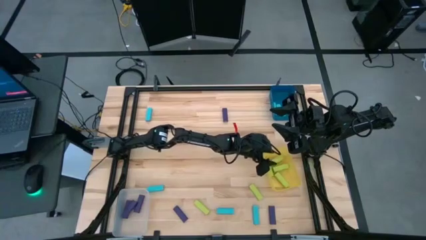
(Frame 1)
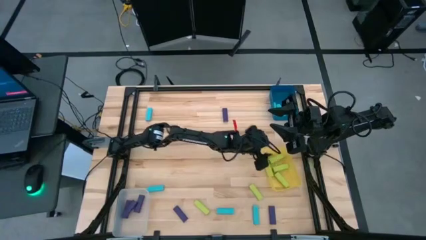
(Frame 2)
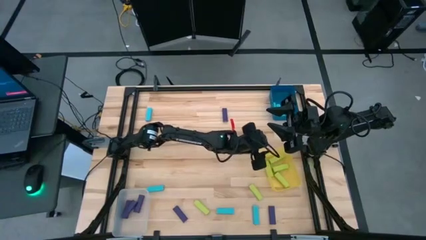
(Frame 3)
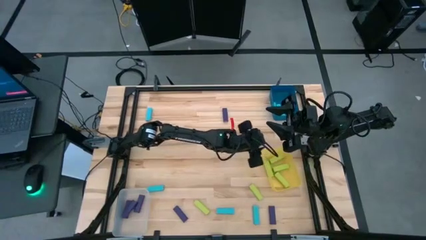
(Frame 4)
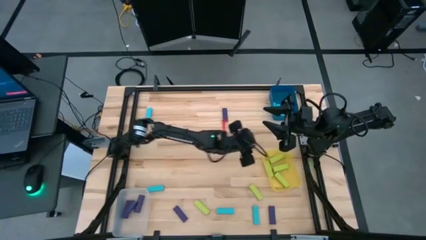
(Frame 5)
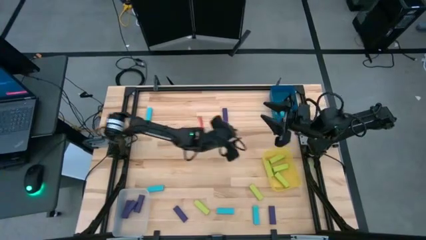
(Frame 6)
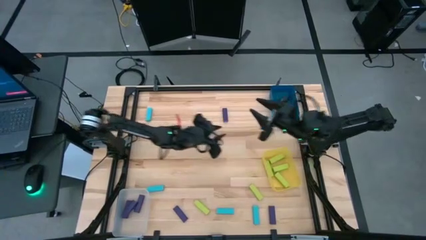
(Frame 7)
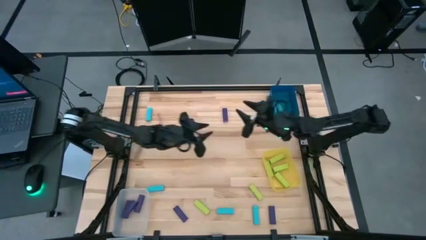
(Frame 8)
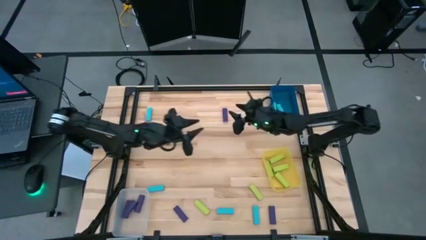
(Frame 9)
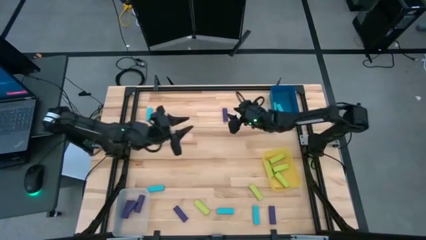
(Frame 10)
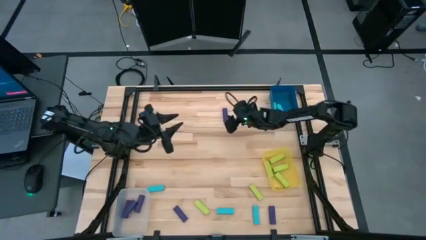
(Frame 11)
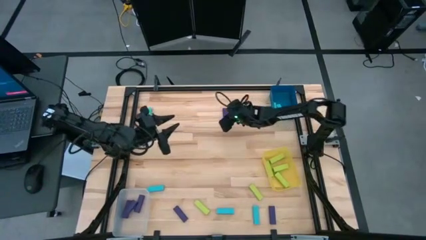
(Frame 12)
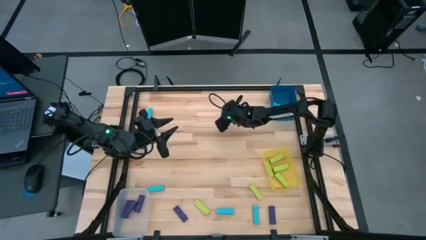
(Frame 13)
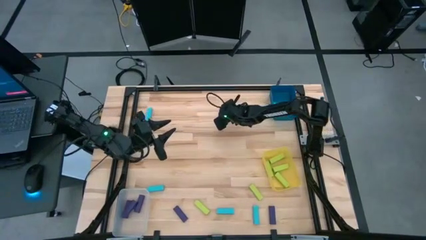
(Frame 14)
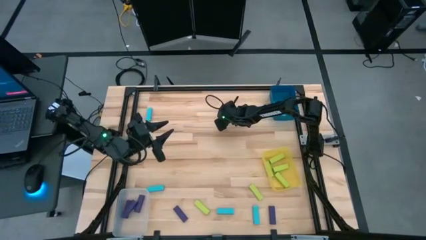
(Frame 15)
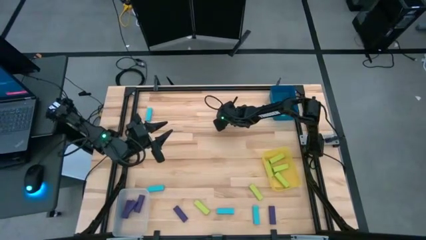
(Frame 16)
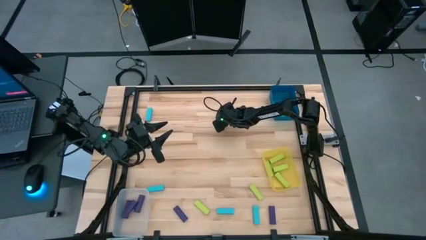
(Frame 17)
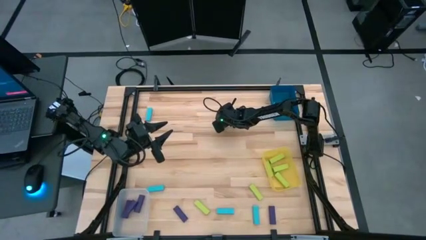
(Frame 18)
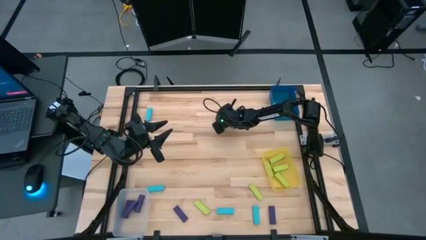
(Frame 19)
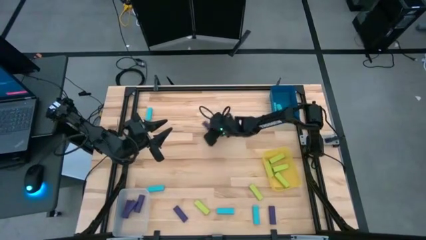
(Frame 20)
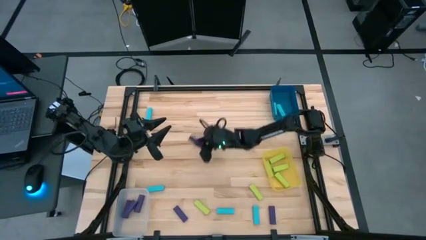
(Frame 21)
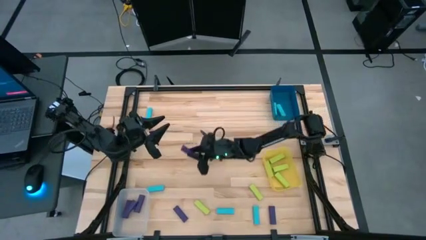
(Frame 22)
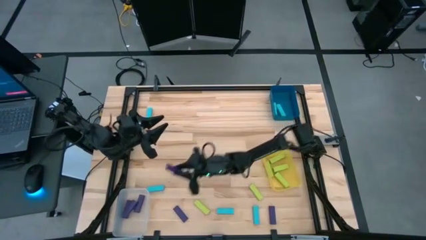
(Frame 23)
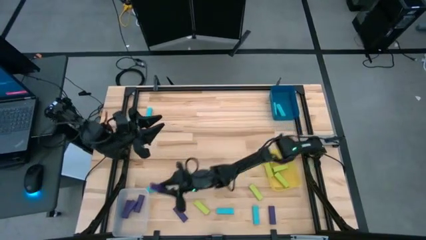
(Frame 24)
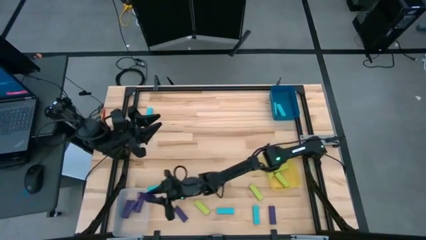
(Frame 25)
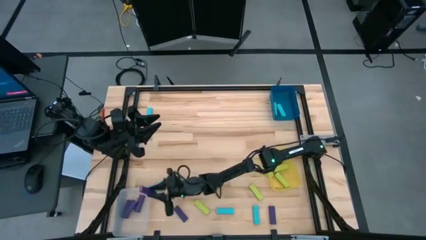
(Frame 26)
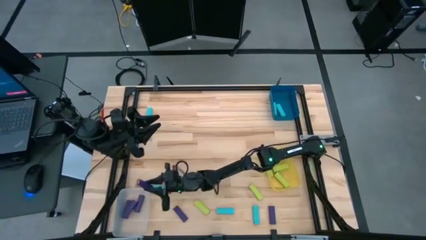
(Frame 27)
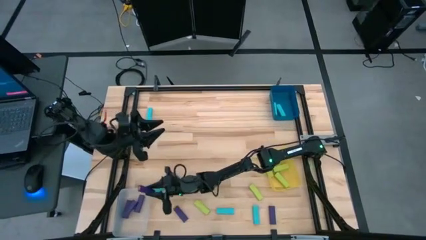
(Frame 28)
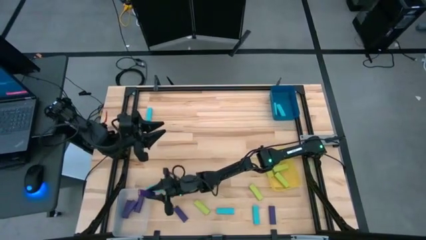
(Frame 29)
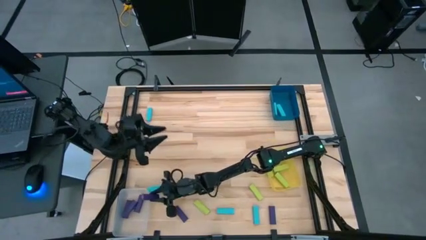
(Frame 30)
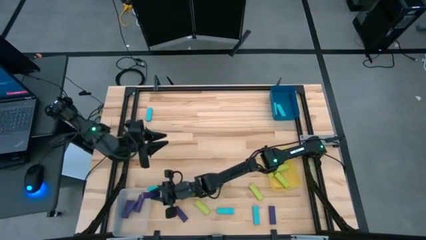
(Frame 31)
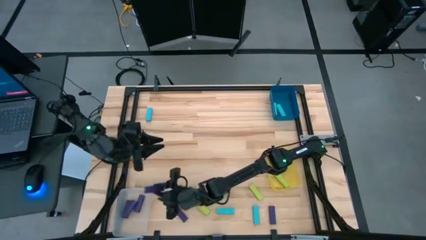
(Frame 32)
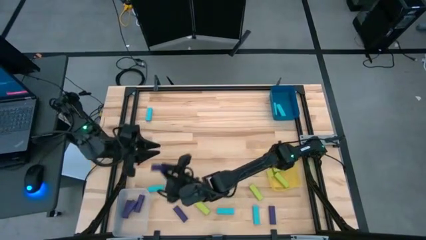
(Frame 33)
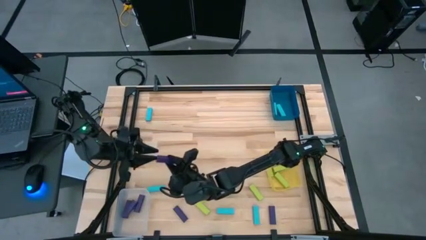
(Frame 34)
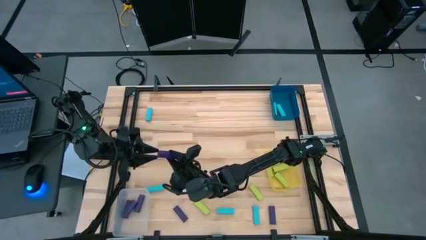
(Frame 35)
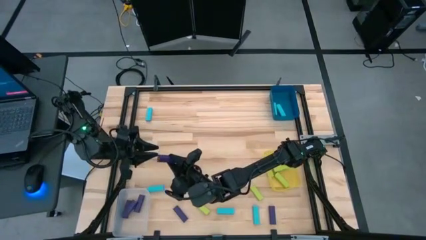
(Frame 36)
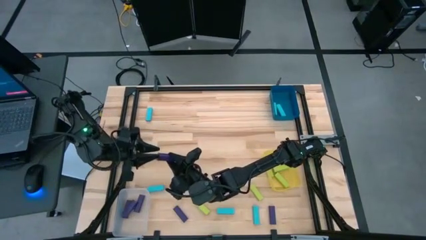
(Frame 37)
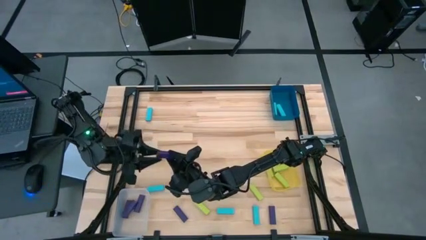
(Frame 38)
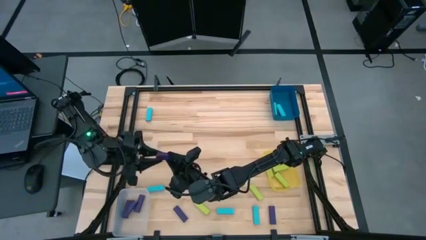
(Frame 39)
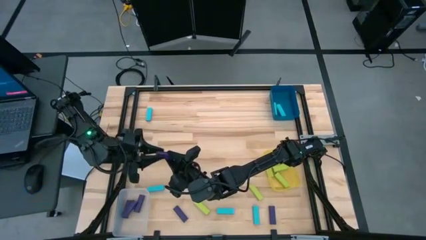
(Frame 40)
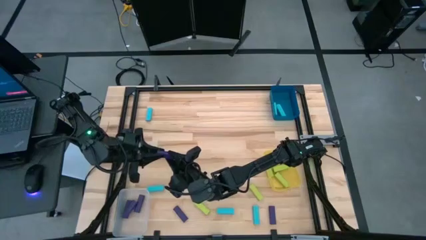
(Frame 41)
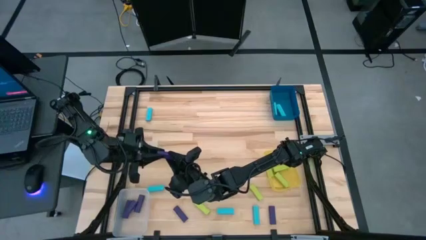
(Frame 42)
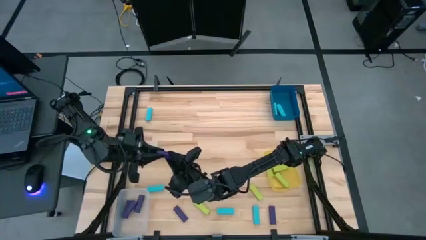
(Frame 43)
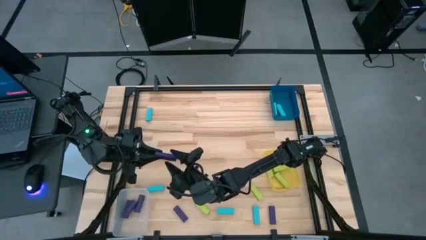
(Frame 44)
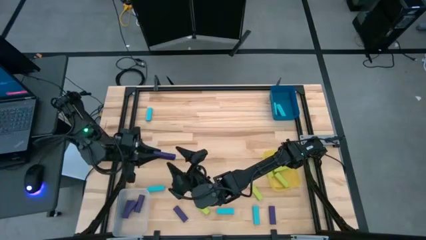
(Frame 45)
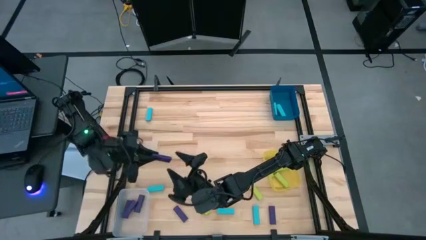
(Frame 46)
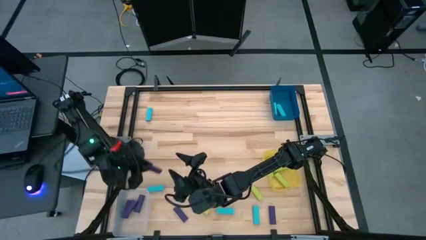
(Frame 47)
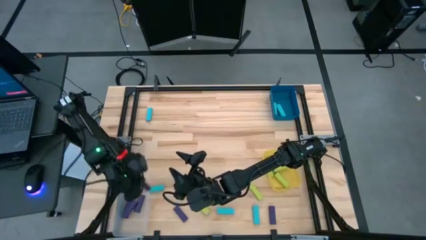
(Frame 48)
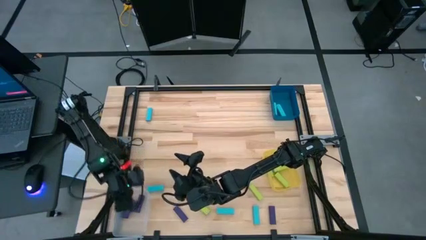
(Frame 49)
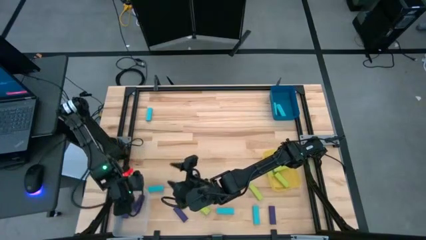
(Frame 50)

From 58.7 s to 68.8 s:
Task: Sort blocks
Put the violet block into the transparent bin
